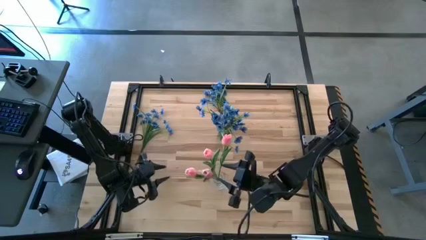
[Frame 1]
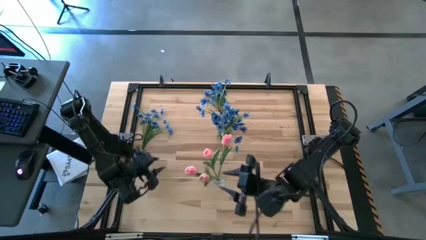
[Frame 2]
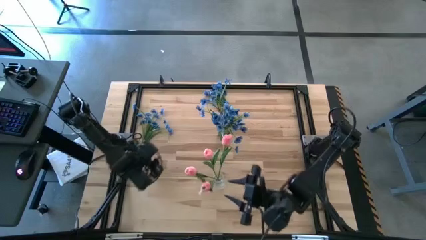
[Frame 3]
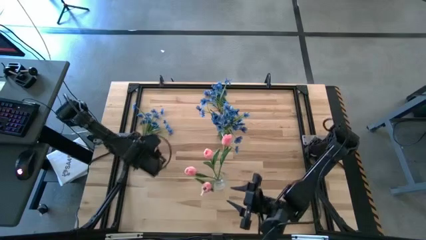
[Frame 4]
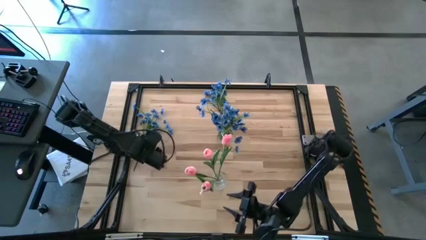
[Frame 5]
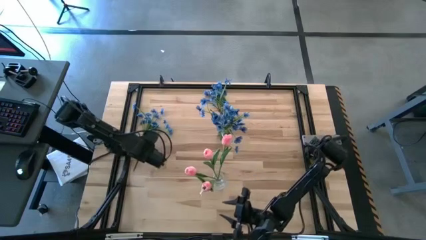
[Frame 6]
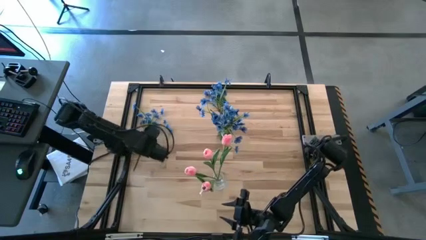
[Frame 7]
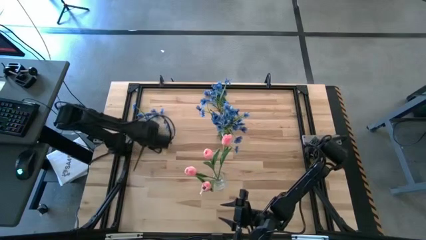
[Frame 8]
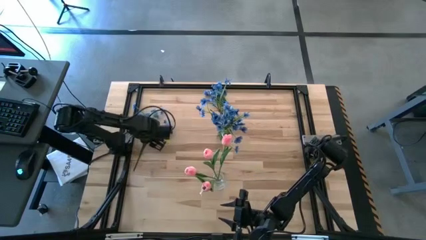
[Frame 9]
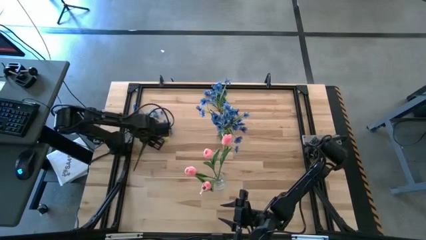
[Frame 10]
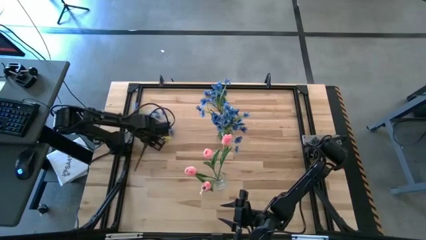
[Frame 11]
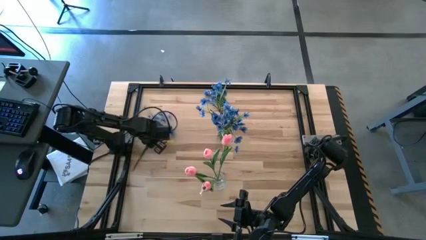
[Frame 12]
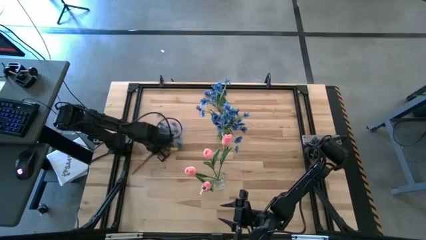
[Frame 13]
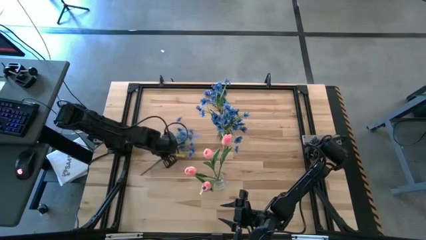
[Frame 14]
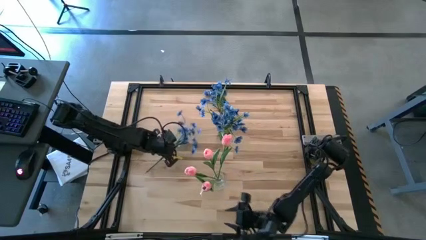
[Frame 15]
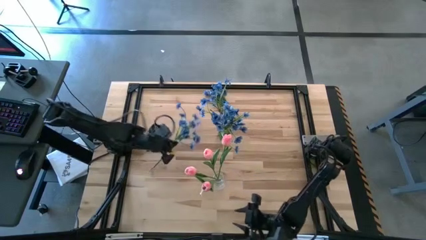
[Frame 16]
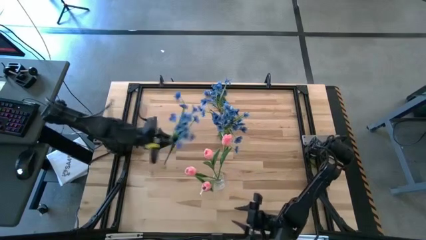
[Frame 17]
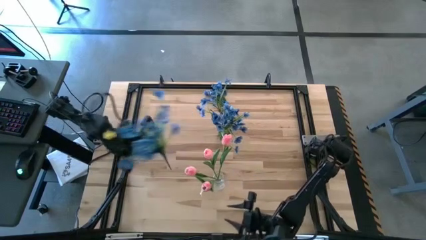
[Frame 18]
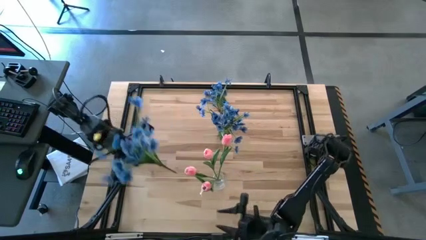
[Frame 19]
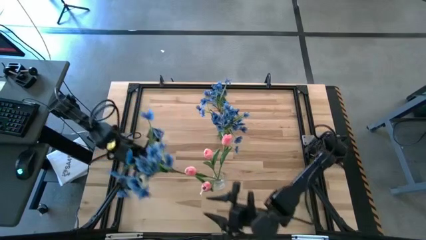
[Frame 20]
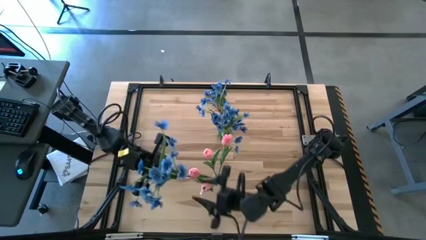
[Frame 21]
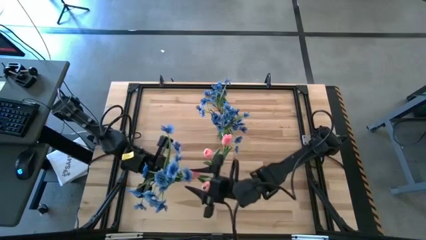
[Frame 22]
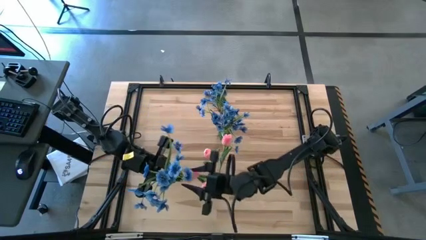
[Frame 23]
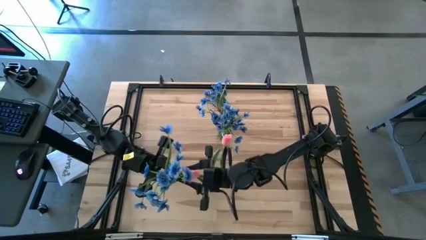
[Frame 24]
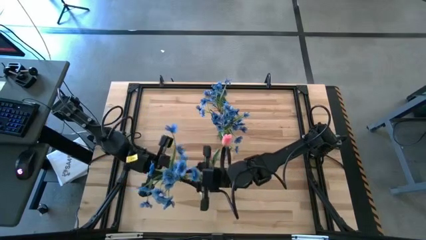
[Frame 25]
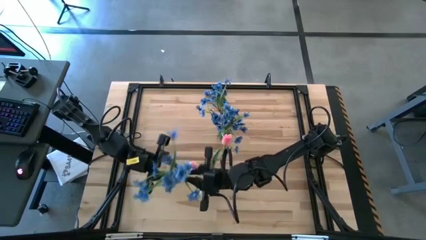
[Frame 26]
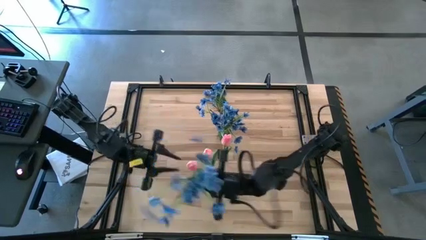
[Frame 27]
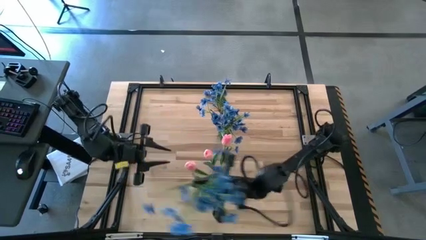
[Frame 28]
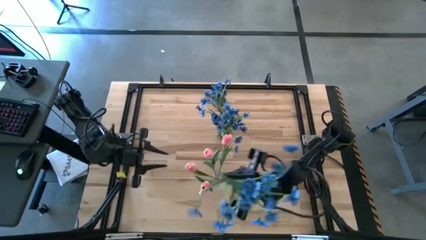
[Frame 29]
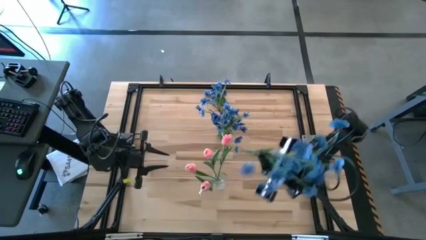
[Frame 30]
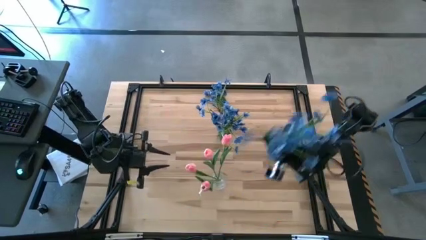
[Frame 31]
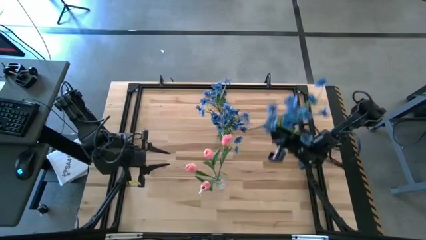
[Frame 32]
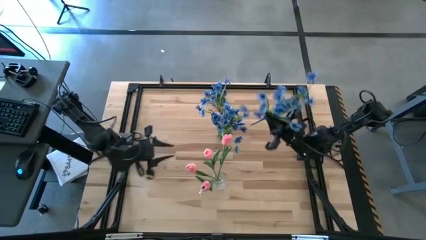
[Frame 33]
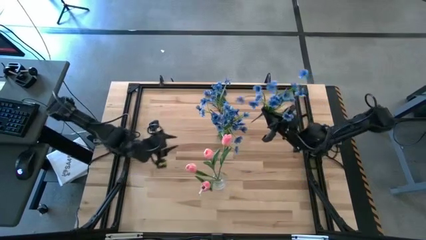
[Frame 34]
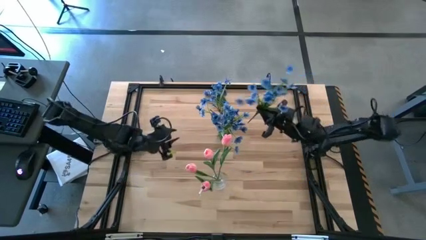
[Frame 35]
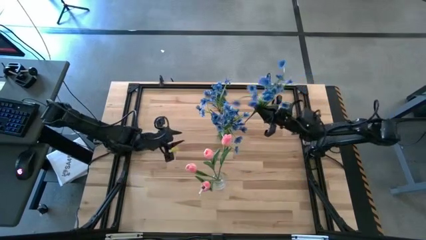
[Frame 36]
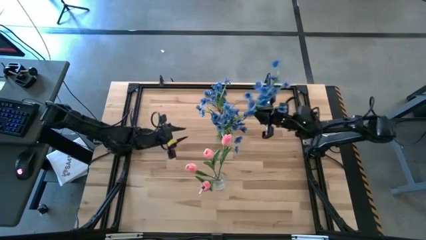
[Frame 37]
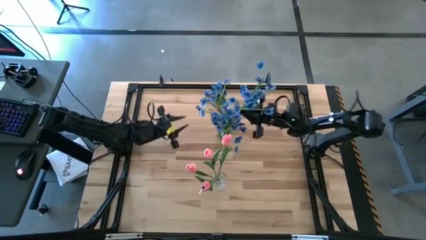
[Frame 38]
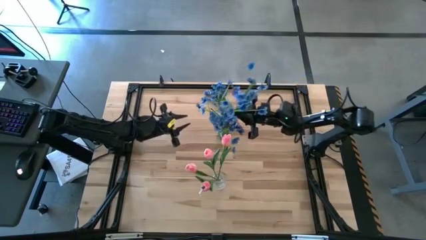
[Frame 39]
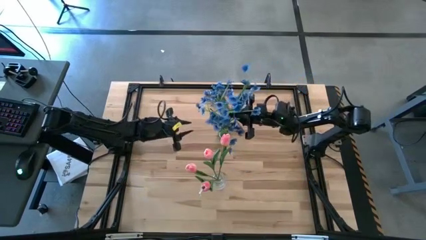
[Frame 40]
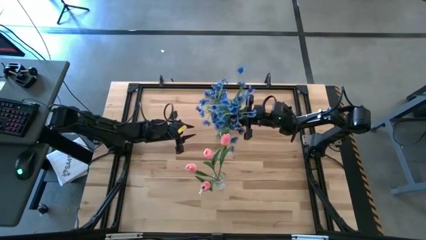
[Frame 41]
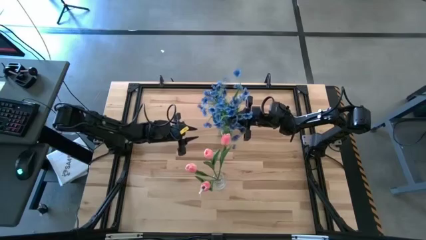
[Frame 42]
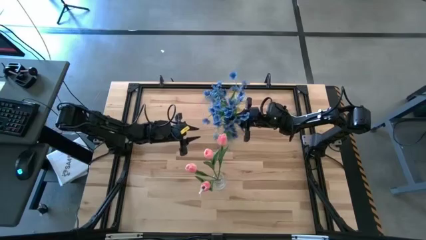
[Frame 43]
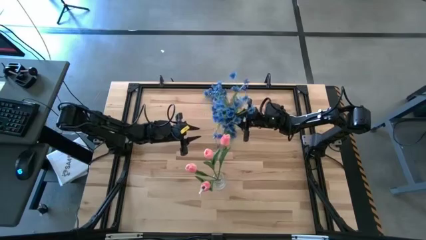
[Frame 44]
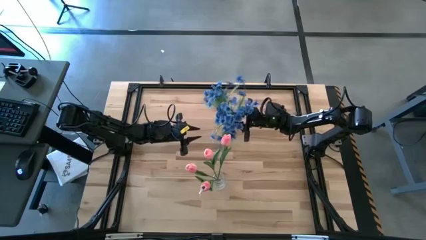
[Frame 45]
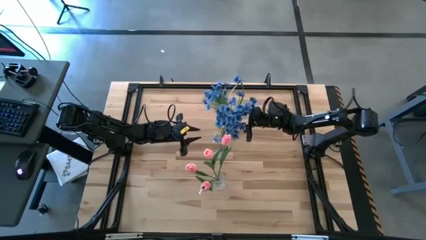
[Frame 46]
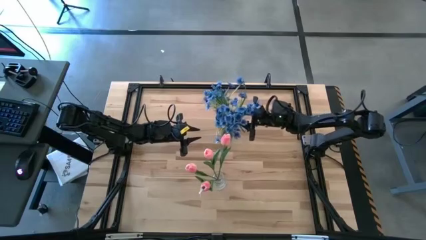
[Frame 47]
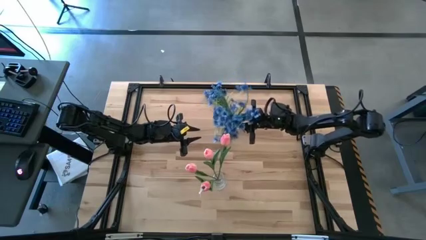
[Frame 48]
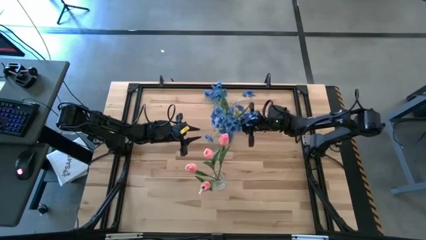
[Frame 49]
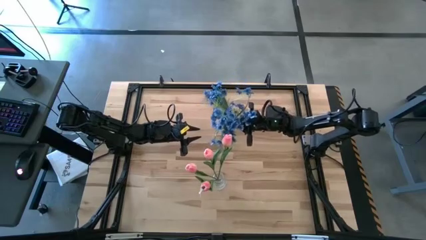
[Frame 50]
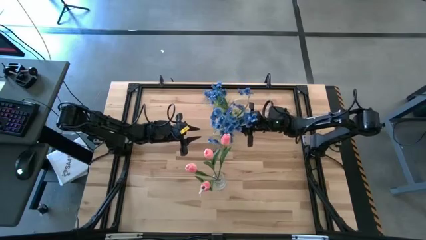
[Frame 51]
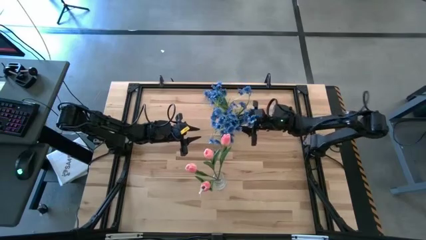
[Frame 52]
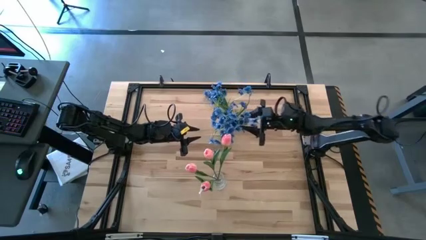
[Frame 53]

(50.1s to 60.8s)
Task: Sort flowers into vase by color
Put the bottom blue flowers into the green vase
